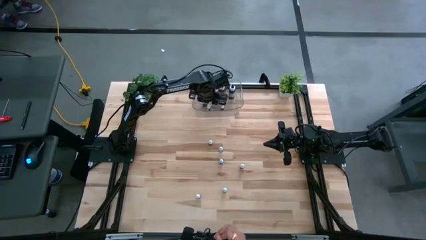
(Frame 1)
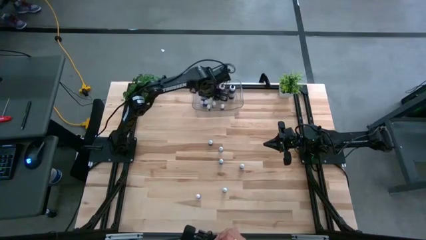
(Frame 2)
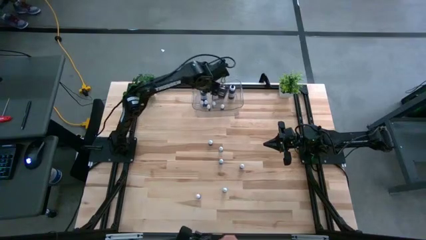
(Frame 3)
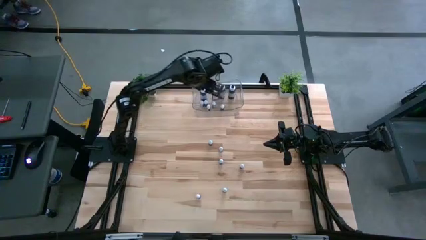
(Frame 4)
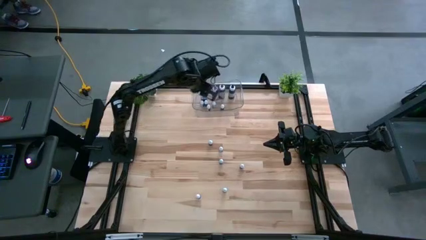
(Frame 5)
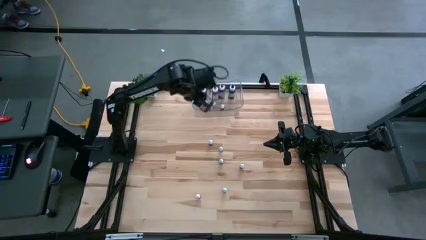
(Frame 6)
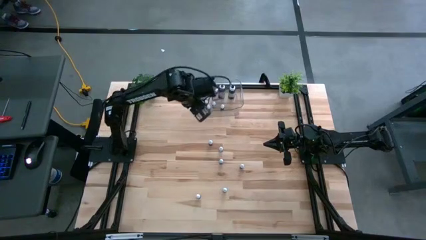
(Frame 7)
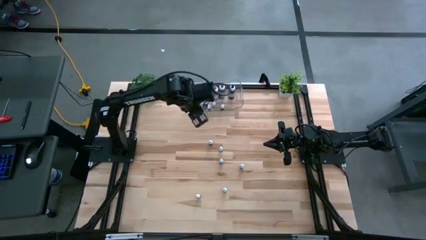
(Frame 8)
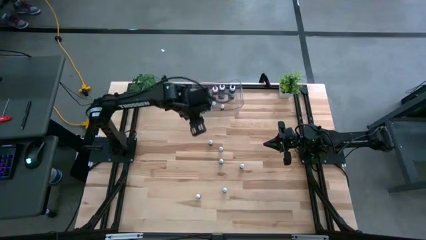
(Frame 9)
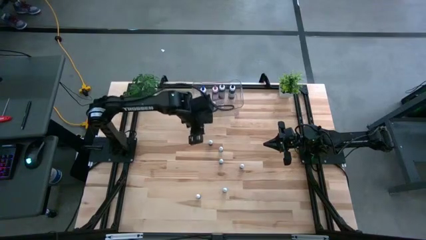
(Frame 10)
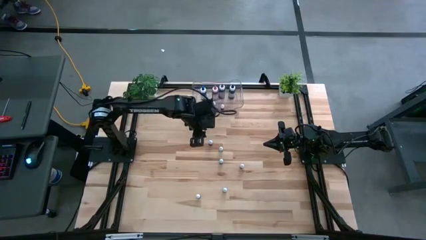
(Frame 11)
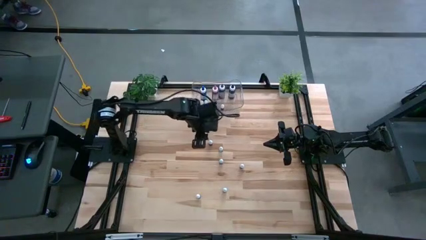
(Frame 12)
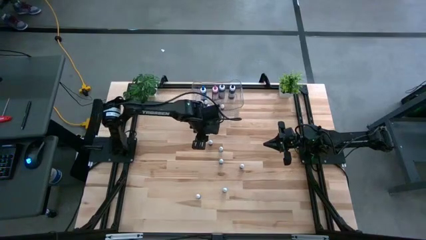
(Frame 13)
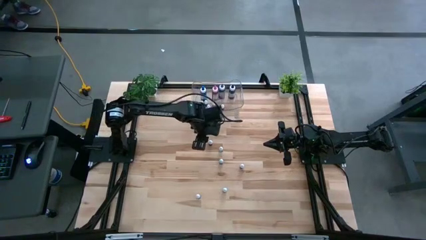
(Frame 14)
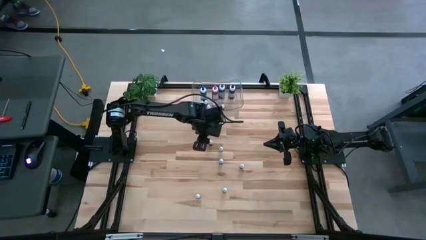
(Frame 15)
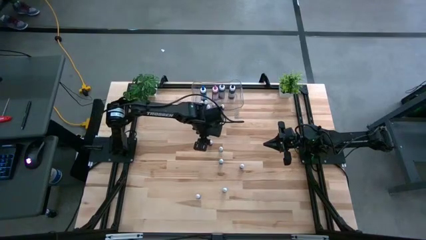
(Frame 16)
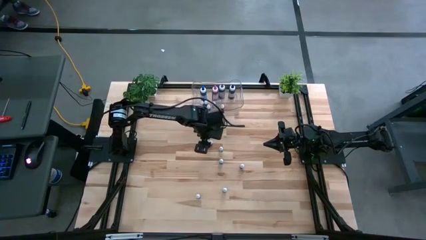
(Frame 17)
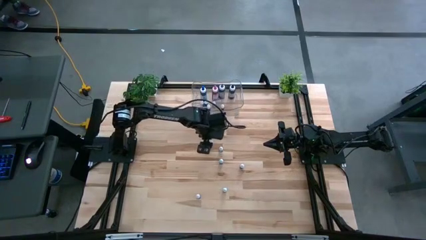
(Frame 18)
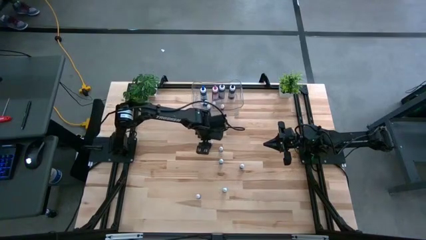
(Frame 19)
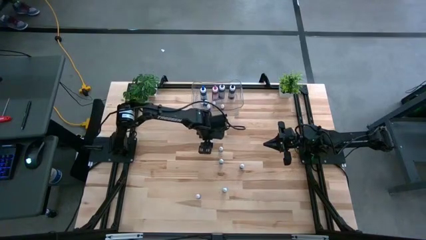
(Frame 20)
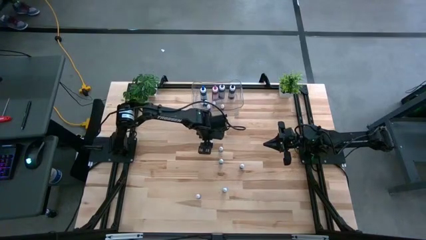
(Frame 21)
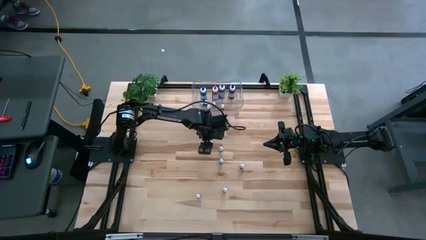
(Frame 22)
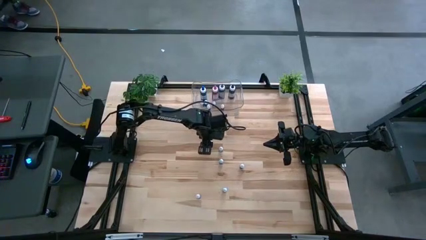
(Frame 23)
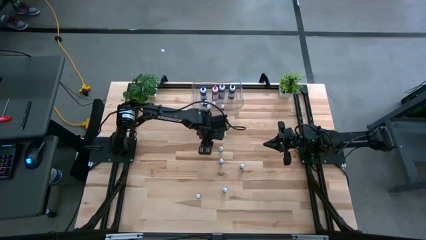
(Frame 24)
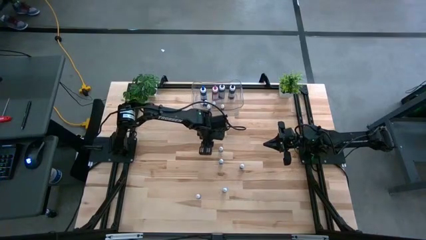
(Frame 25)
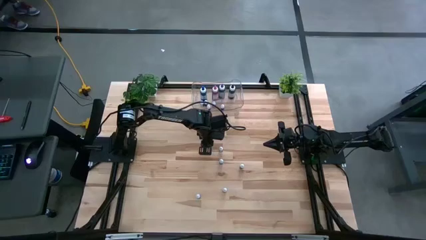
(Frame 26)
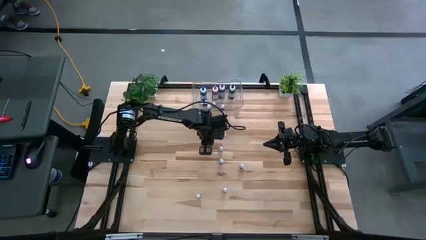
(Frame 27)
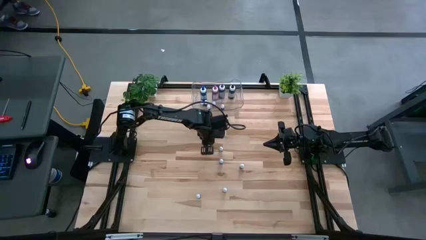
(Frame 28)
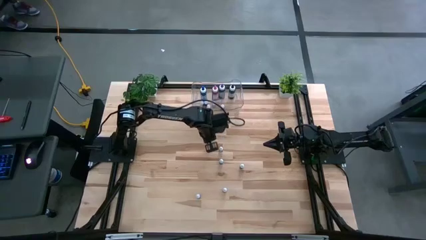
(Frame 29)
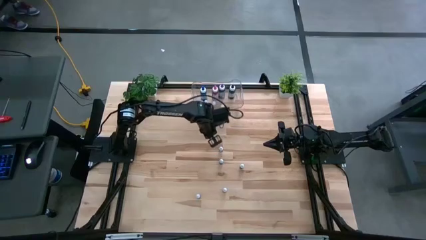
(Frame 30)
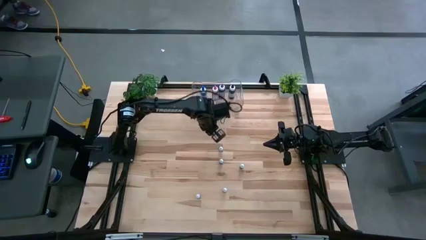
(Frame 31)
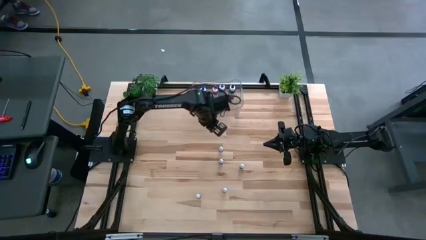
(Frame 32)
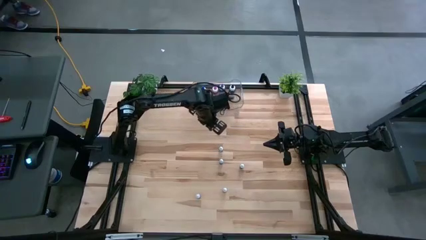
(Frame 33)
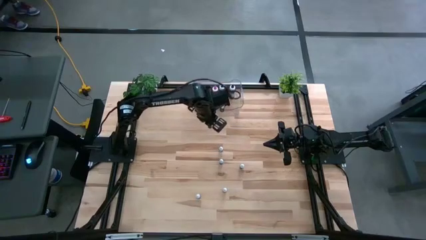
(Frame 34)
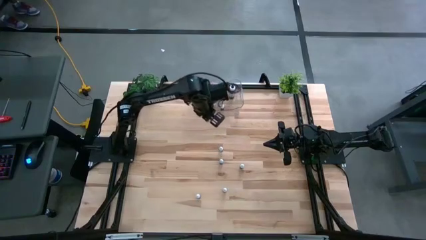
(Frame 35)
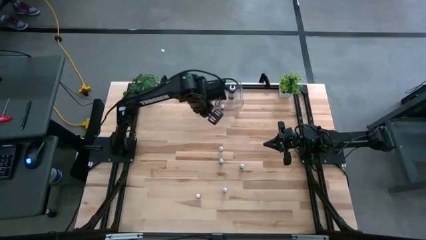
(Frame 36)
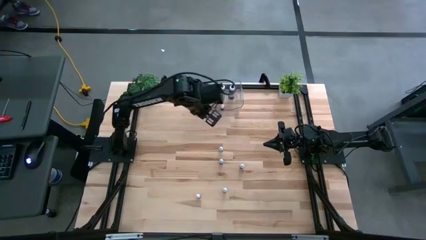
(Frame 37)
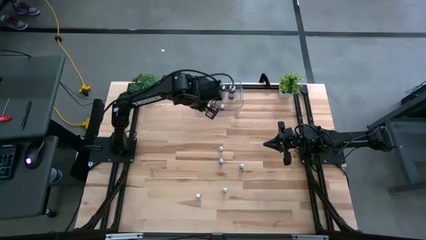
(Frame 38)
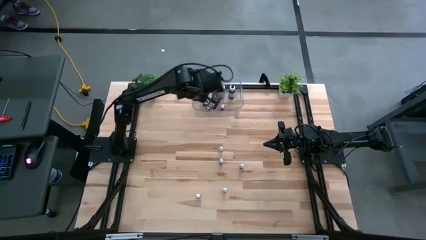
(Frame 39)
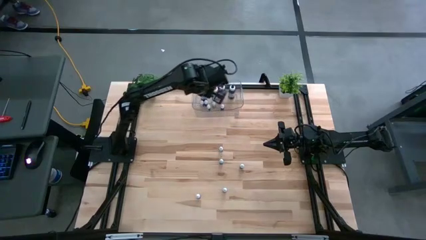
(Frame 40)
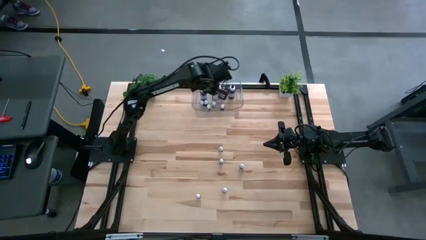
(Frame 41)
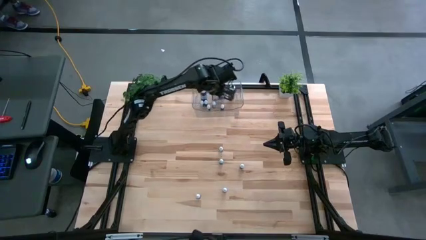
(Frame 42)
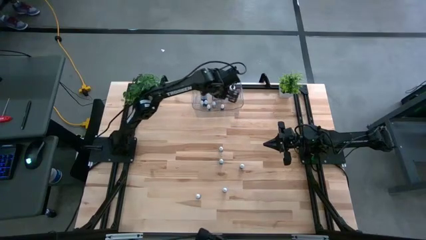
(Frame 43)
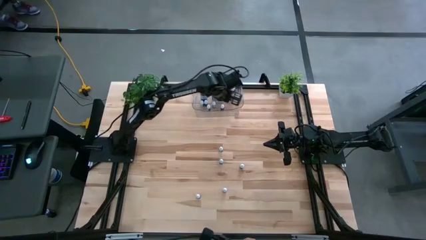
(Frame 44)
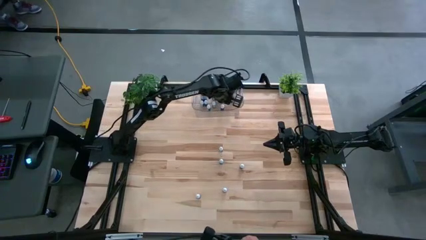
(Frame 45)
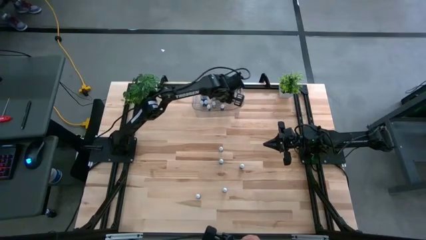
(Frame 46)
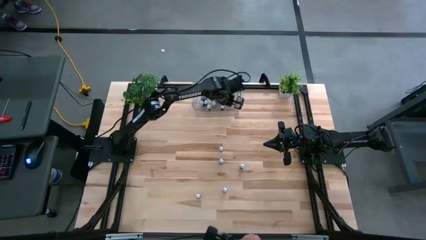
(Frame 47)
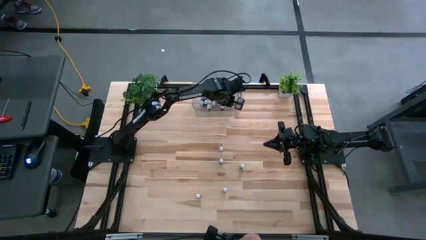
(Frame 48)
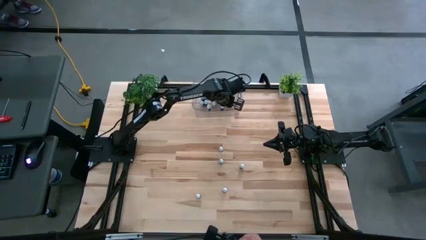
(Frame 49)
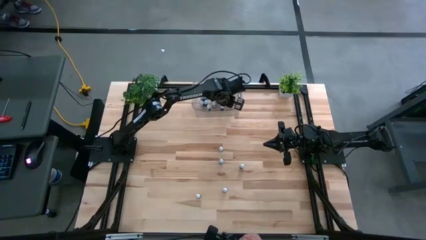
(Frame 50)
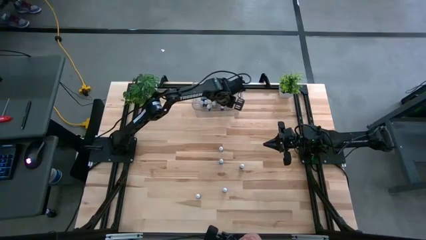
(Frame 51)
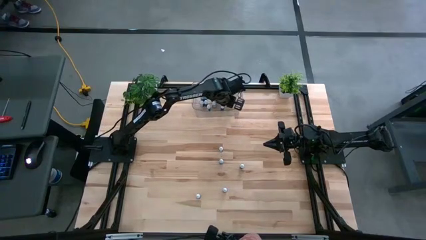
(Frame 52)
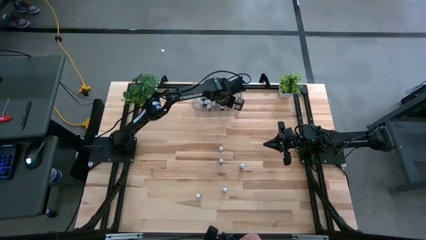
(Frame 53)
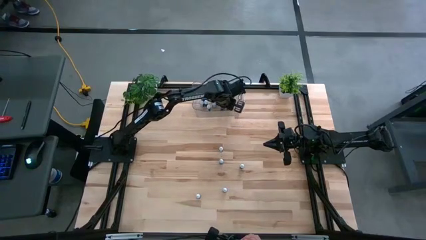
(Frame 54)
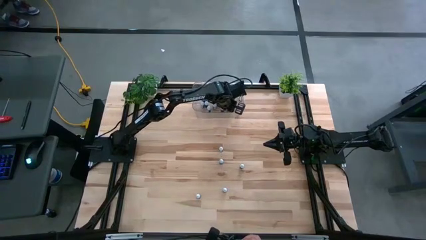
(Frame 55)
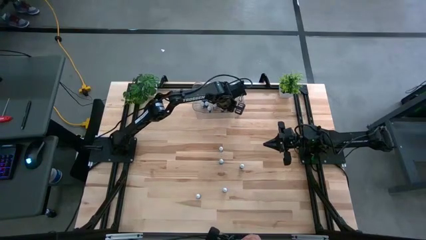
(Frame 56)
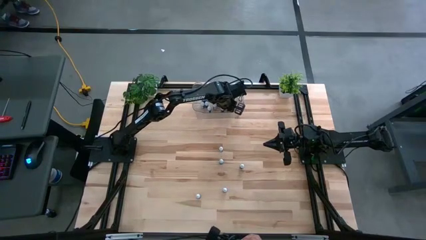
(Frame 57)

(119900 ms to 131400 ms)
Task: Pick & Place food coloring
Put the small black food coloring bottle into the transparent bin
